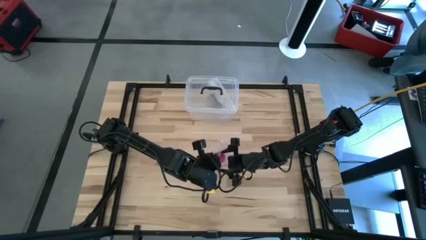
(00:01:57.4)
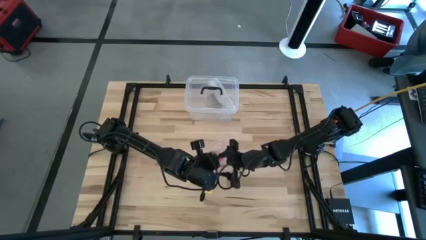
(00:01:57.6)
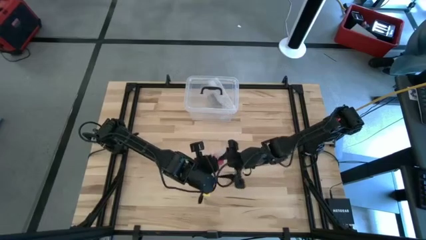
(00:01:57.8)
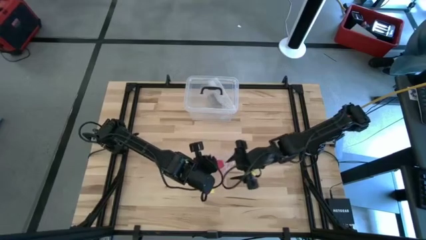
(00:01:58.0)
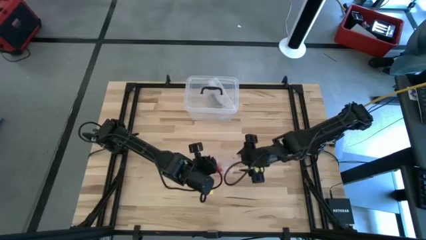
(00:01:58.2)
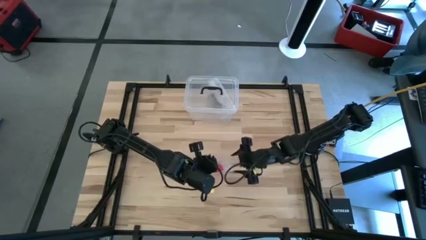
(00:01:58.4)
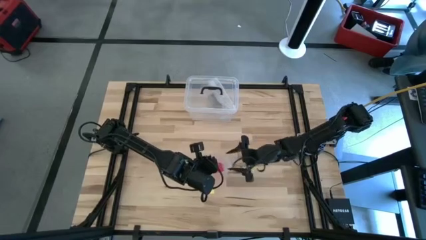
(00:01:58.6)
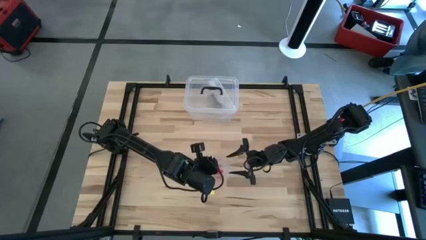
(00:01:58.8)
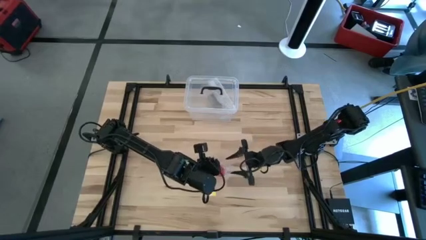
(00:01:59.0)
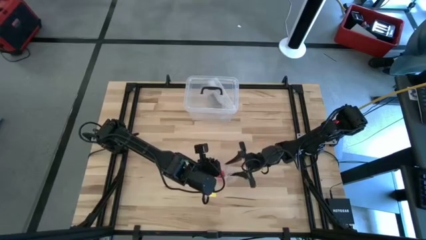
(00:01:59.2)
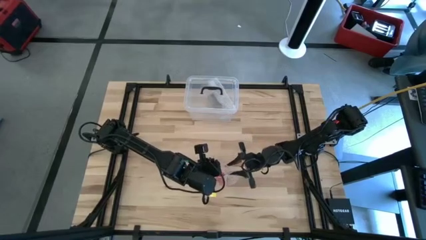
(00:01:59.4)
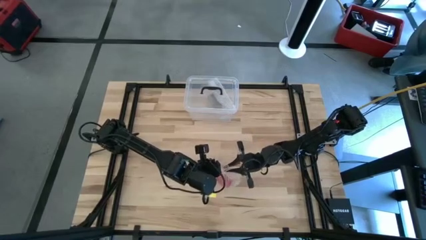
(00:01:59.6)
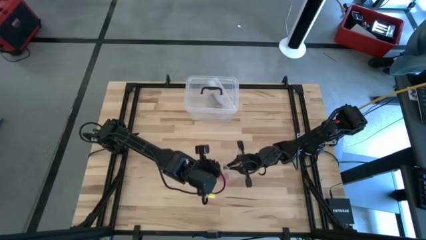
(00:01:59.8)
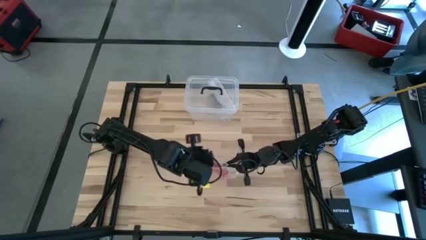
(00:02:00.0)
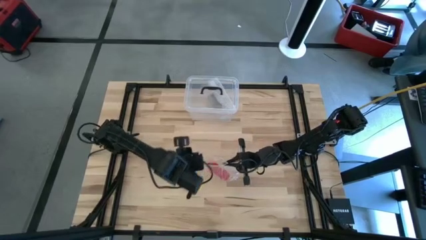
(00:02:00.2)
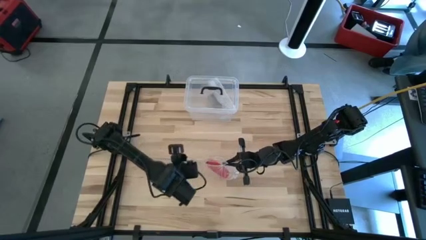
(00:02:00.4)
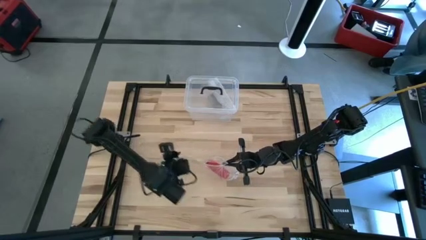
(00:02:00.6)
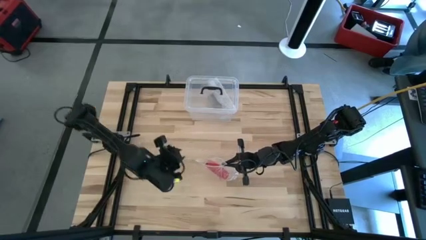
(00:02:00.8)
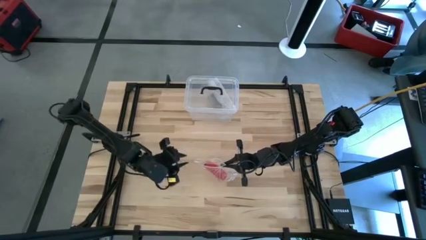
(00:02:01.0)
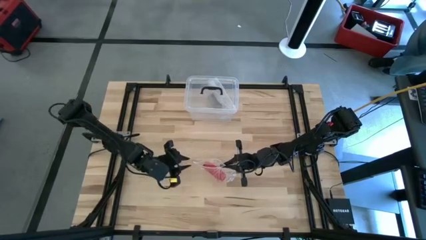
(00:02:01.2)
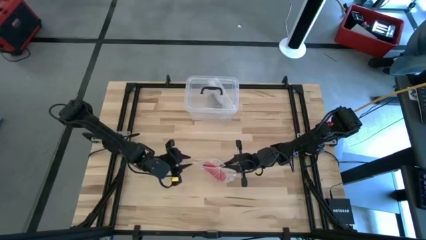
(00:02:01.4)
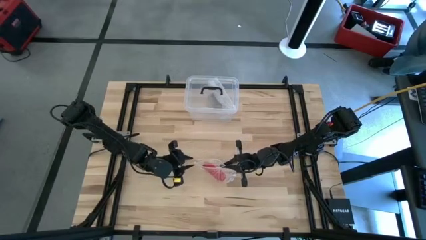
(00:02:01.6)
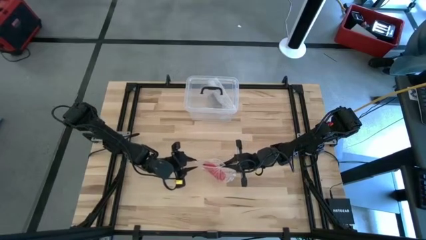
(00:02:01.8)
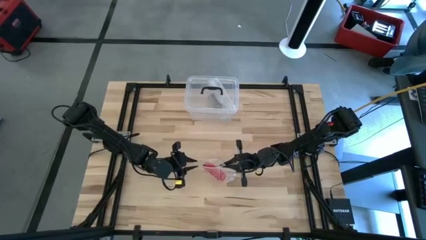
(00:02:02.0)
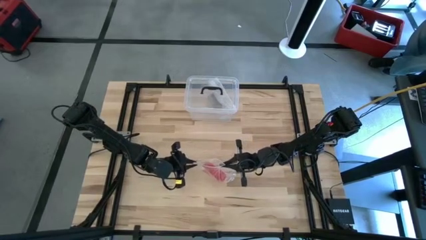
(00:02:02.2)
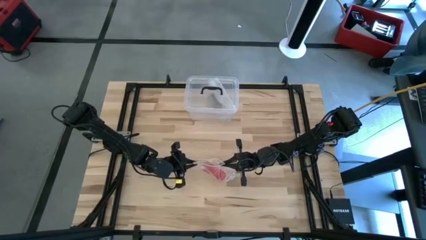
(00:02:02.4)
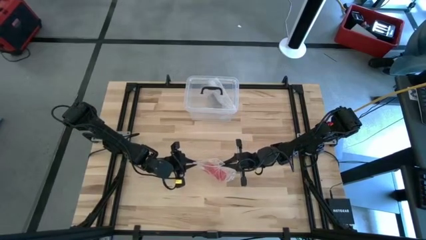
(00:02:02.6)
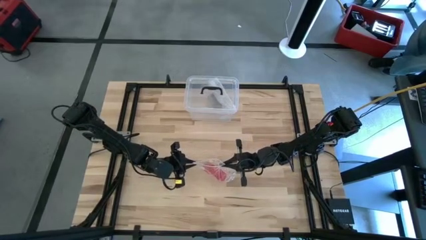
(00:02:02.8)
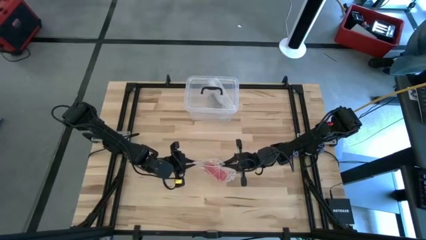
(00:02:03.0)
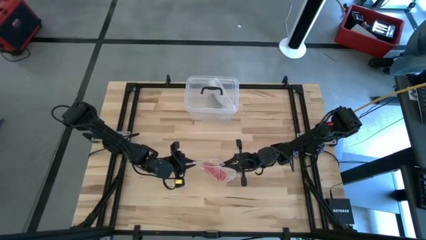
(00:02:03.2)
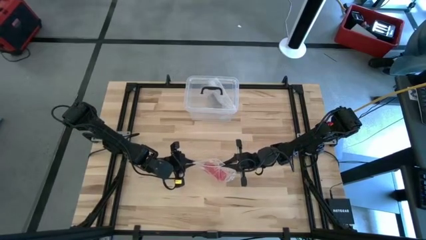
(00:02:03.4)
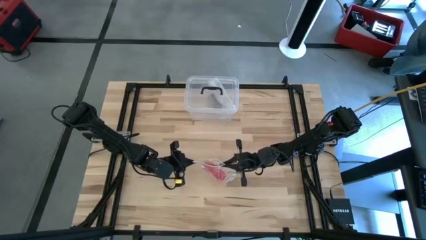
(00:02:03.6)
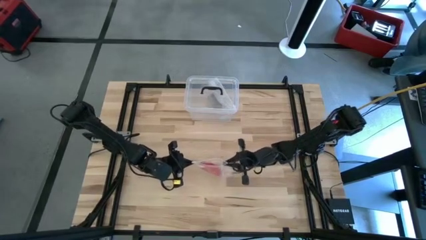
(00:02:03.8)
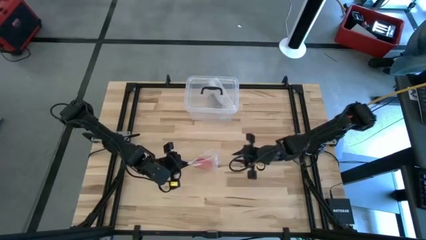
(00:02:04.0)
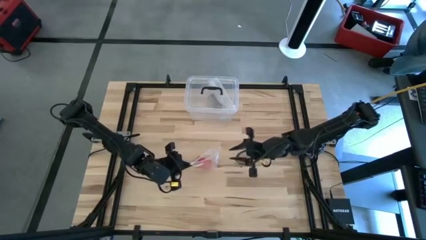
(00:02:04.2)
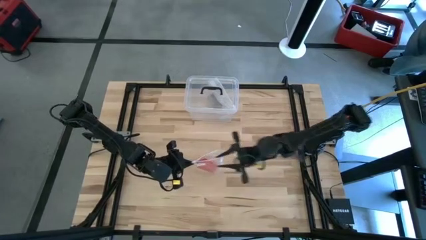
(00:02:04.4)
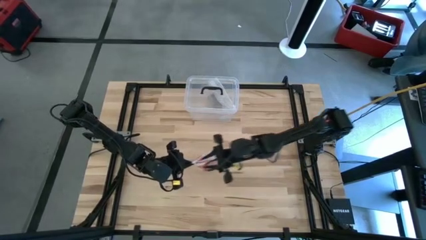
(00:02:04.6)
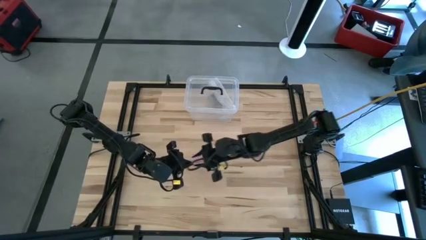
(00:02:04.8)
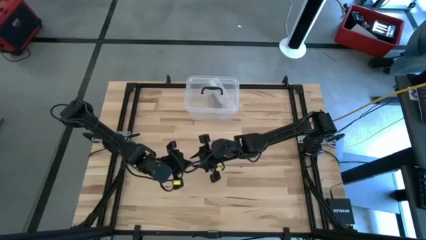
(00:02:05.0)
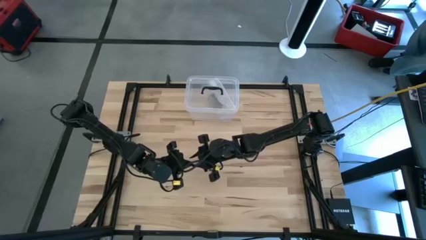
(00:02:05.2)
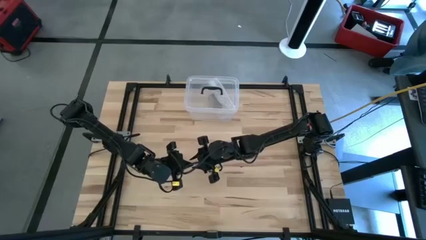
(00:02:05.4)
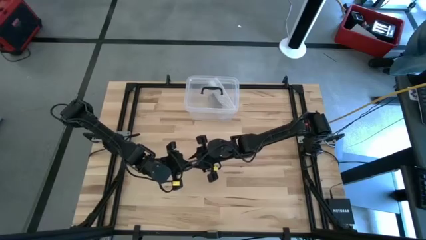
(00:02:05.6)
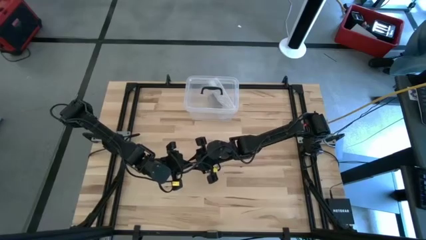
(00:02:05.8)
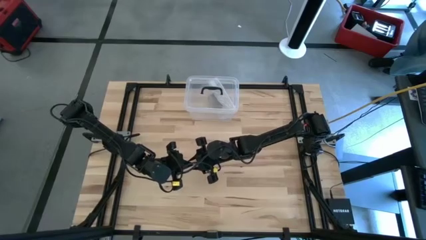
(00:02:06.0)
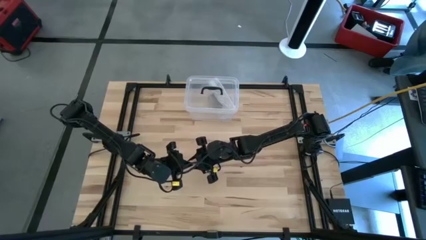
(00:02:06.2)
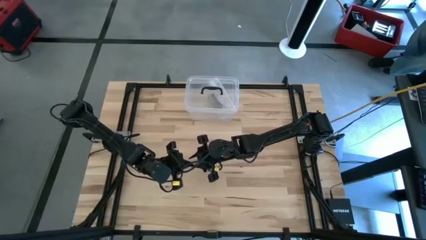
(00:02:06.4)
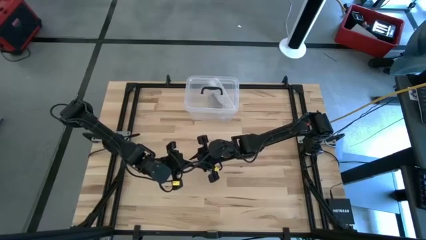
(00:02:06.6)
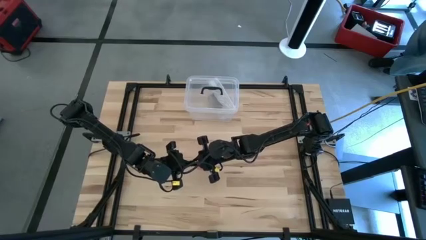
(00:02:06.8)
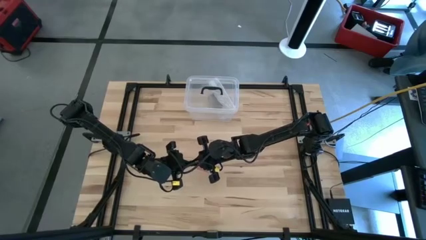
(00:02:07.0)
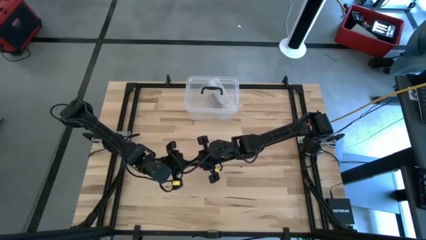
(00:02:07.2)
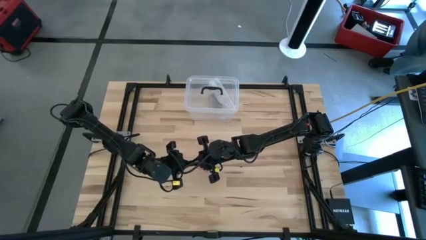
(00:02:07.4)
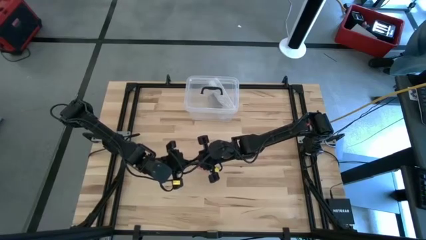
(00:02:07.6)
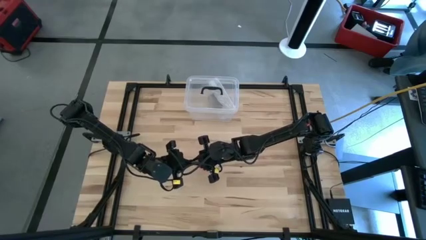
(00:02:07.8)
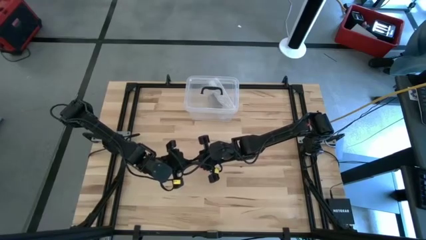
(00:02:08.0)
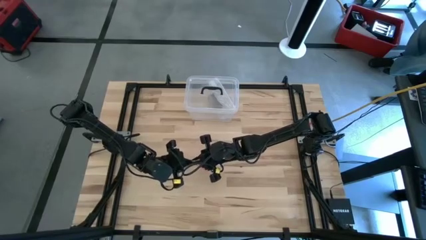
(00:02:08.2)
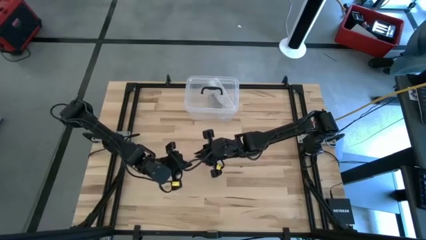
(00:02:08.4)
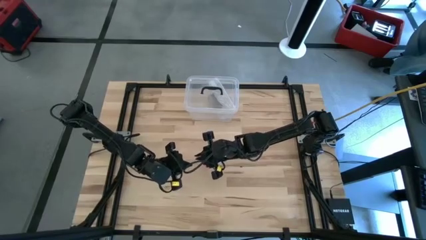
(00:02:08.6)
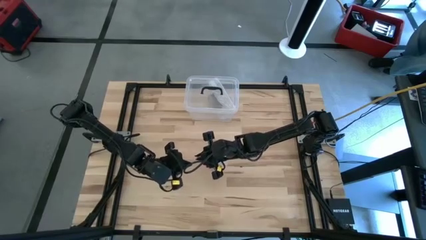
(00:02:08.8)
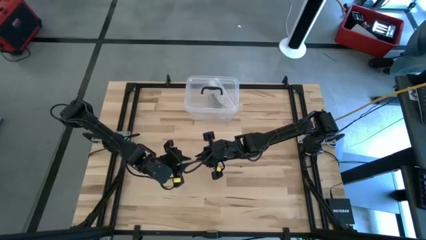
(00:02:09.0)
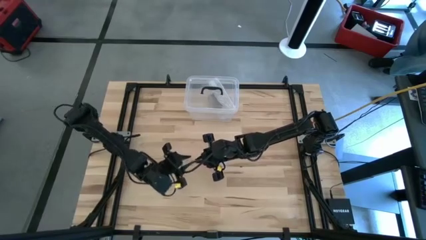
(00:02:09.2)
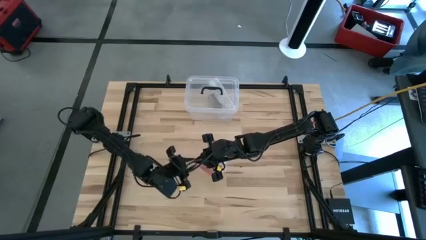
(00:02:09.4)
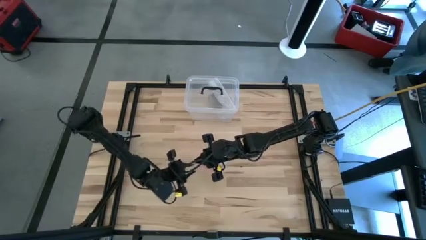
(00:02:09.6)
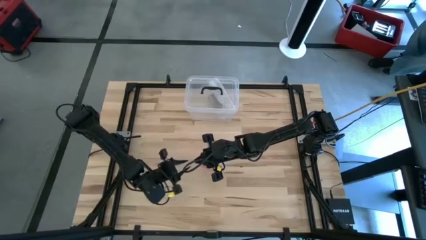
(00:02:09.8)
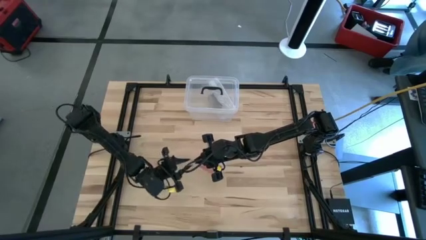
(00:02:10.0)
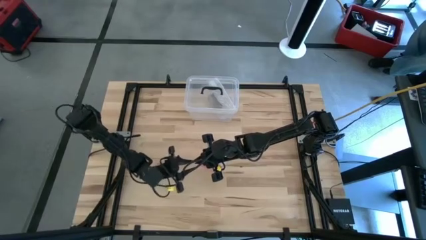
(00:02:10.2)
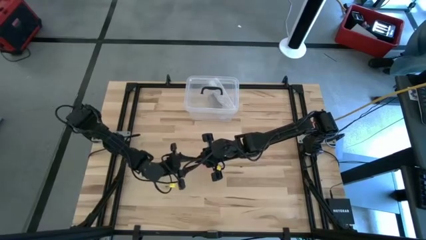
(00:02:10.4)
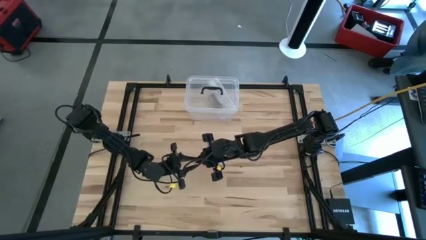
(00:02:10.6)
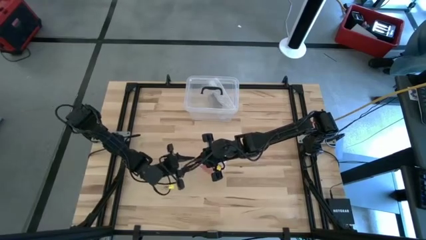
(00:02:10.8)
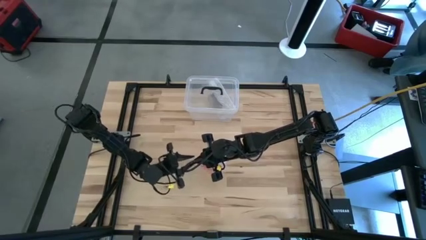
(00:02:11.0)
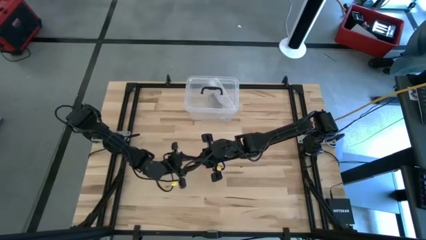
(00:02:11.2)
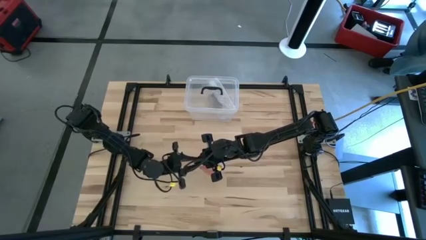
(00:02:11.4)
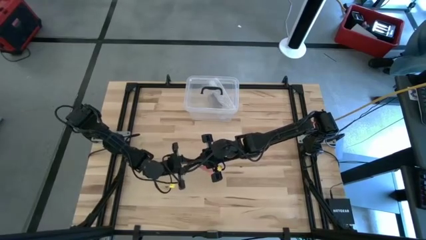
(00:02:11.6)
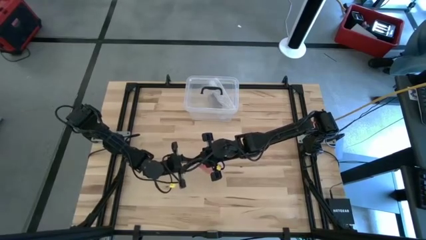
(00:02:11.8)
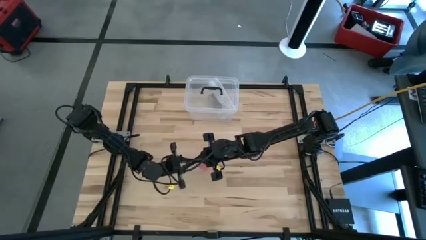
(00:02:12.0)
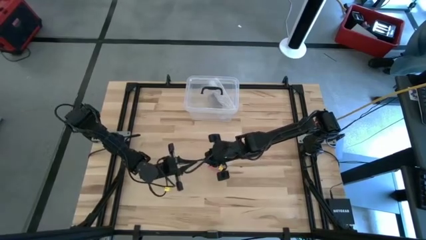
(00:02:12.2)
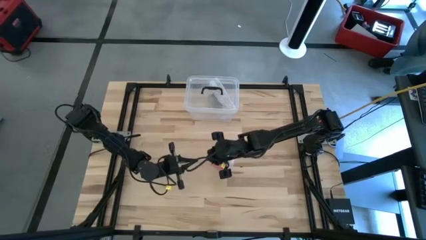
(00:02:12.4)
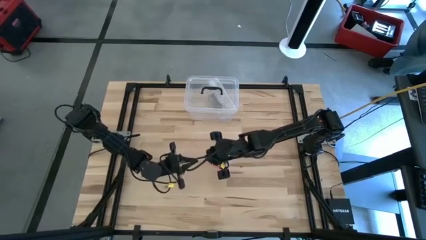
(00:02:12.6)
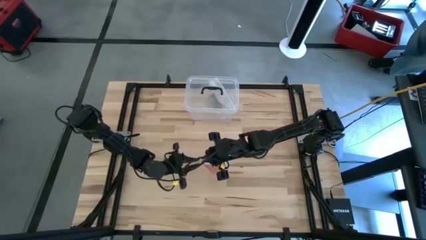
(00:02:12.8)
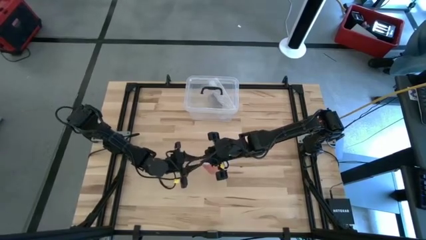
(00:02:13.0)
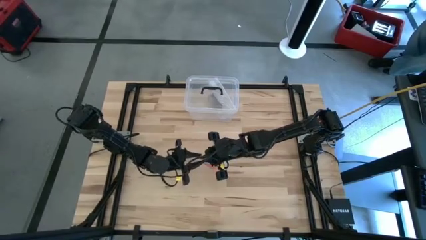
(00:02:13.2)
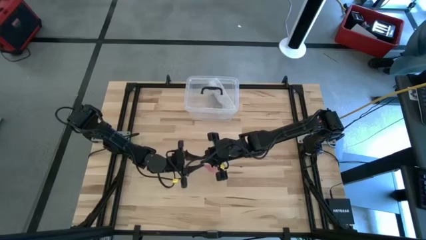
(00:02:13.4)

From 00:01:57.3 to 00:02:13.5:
Task: Roll bandage
Close the transparent zip bag
